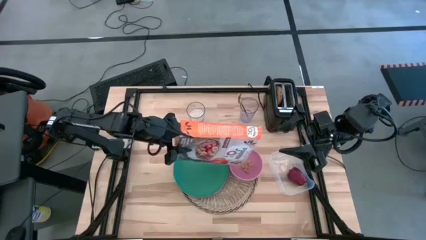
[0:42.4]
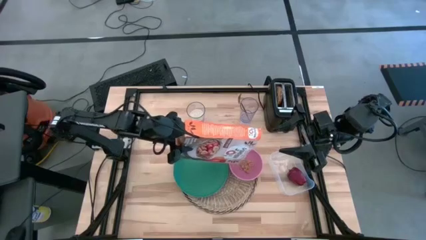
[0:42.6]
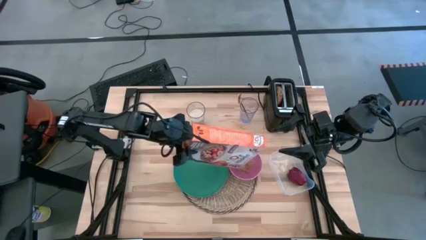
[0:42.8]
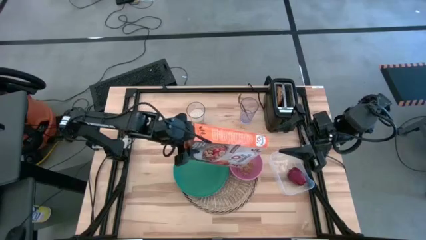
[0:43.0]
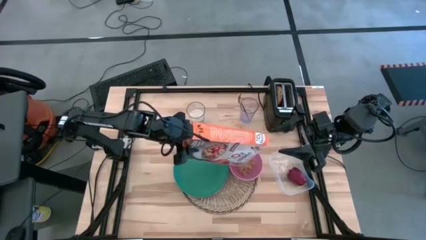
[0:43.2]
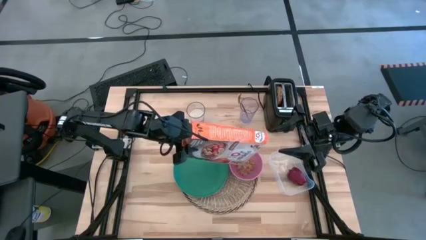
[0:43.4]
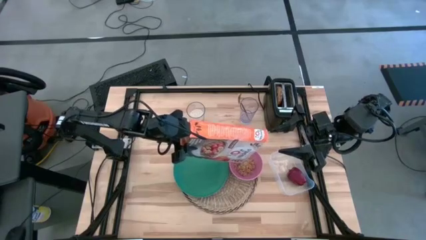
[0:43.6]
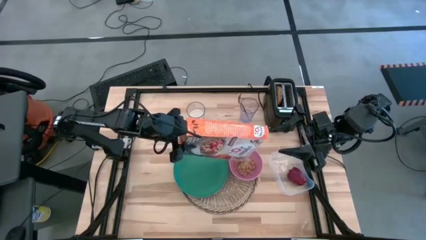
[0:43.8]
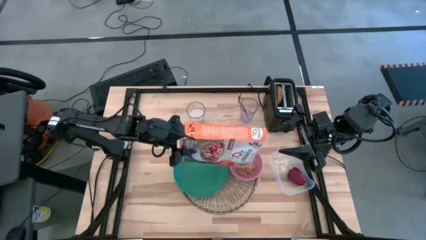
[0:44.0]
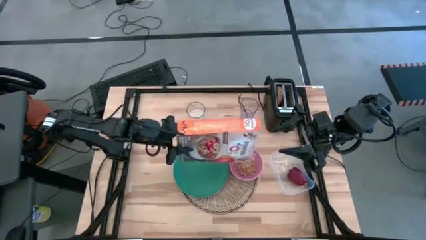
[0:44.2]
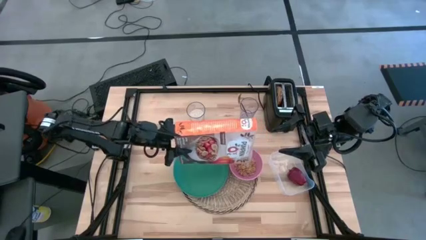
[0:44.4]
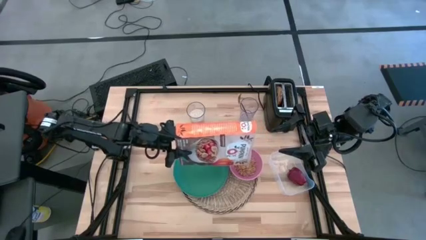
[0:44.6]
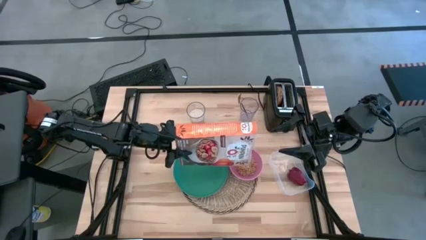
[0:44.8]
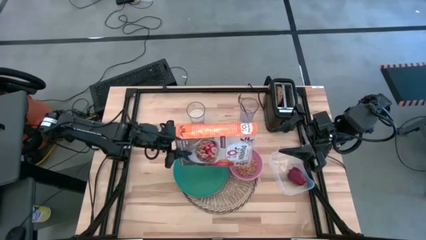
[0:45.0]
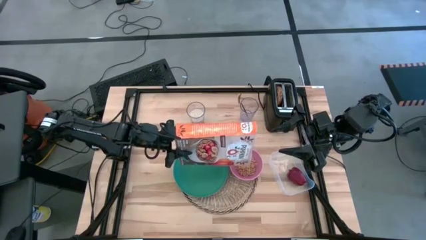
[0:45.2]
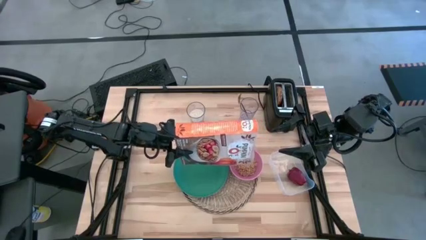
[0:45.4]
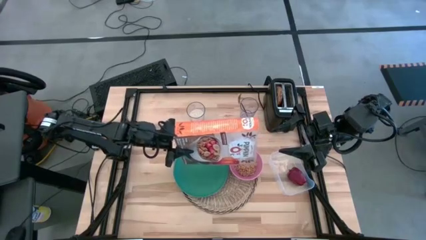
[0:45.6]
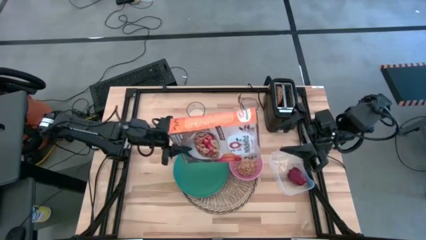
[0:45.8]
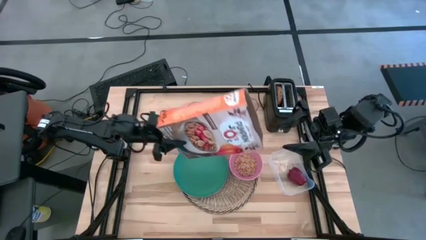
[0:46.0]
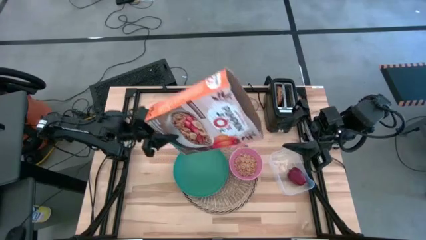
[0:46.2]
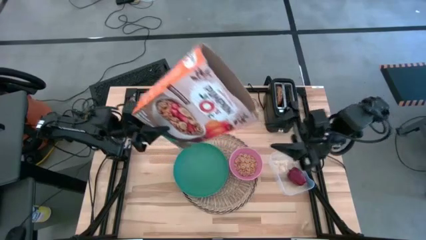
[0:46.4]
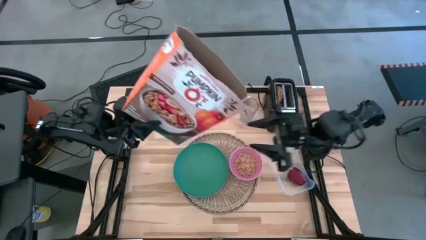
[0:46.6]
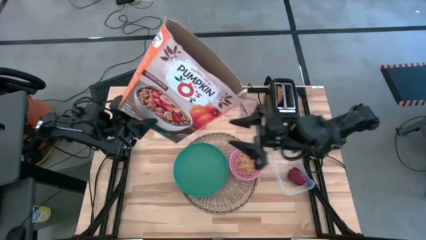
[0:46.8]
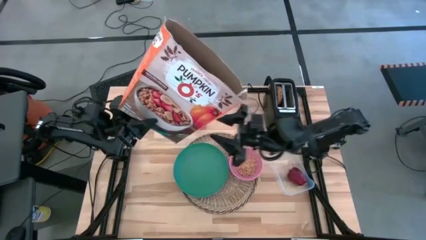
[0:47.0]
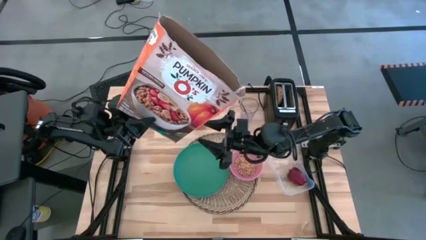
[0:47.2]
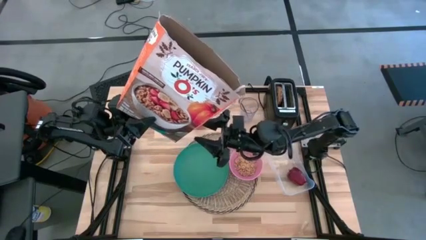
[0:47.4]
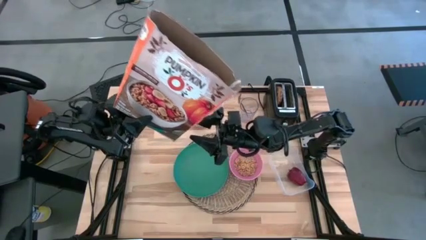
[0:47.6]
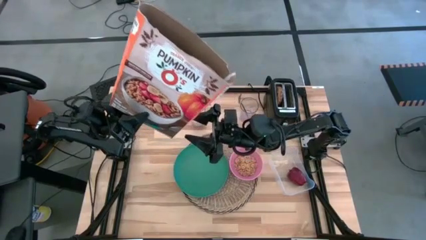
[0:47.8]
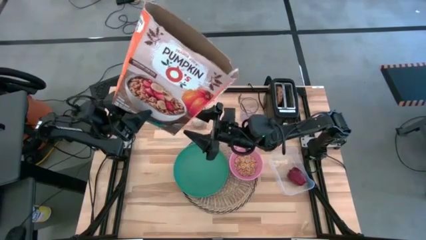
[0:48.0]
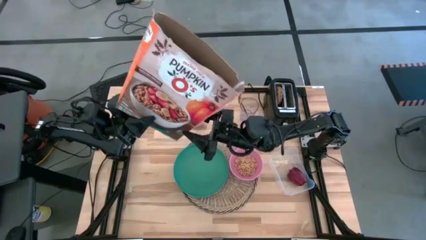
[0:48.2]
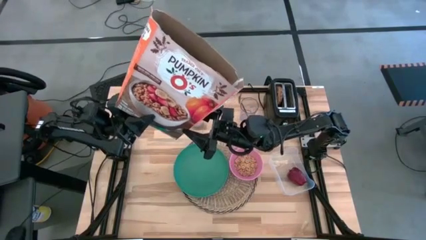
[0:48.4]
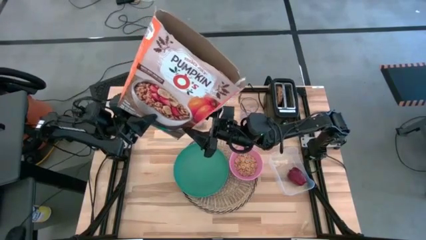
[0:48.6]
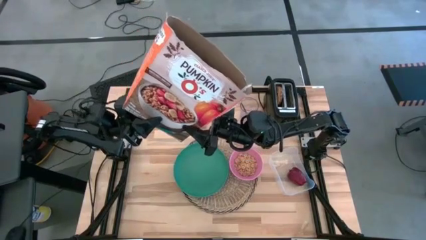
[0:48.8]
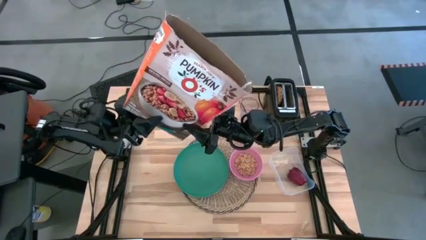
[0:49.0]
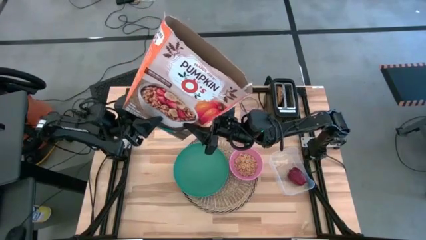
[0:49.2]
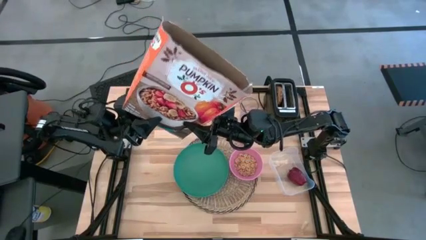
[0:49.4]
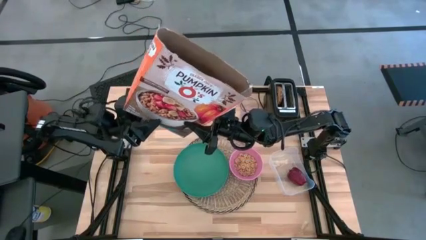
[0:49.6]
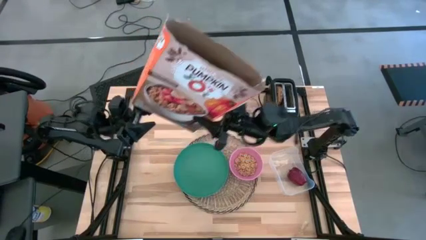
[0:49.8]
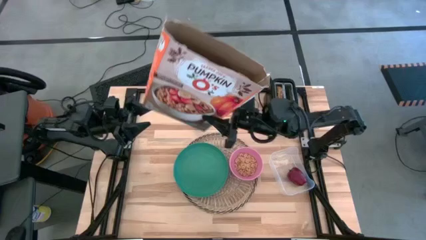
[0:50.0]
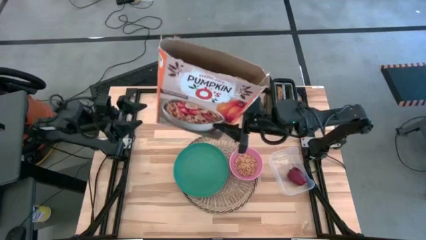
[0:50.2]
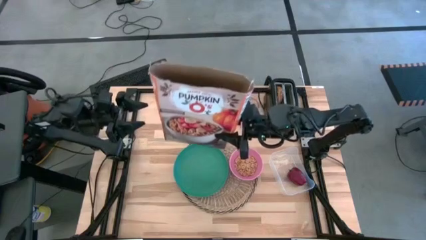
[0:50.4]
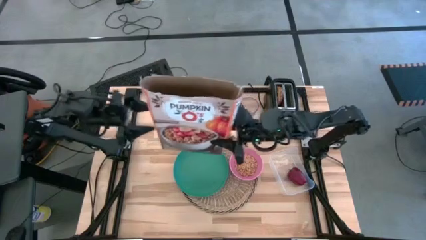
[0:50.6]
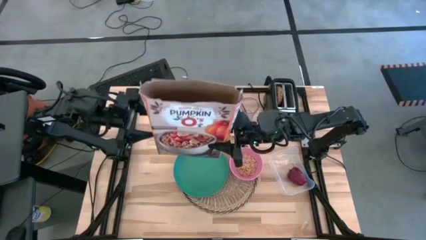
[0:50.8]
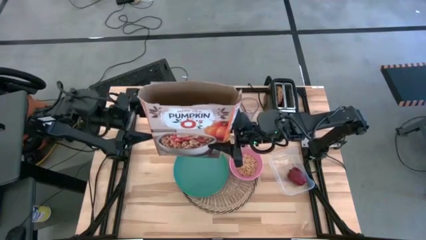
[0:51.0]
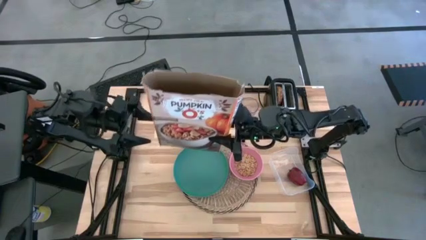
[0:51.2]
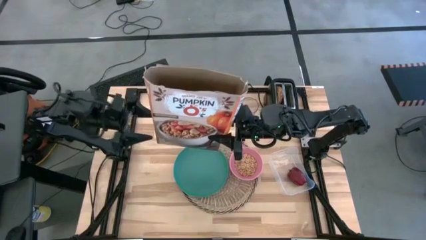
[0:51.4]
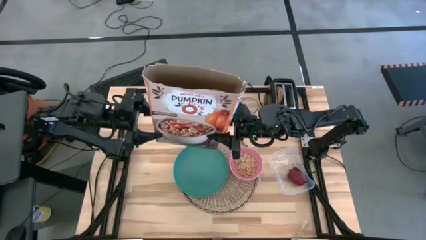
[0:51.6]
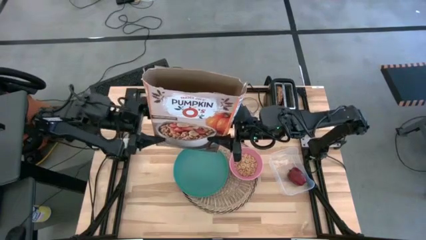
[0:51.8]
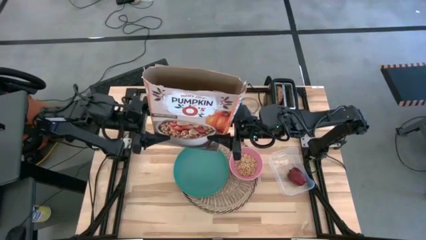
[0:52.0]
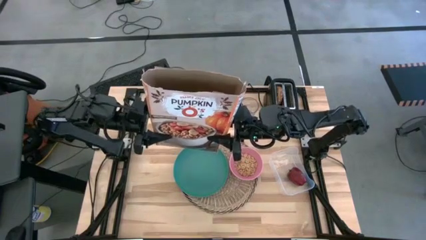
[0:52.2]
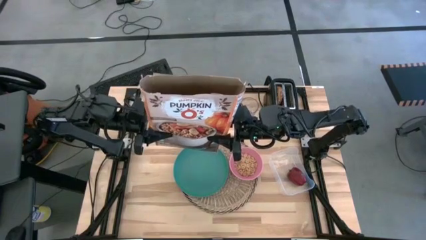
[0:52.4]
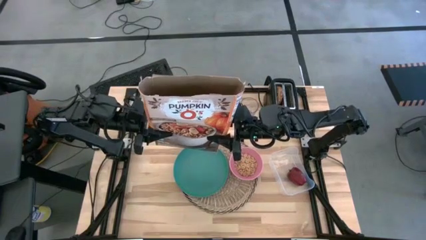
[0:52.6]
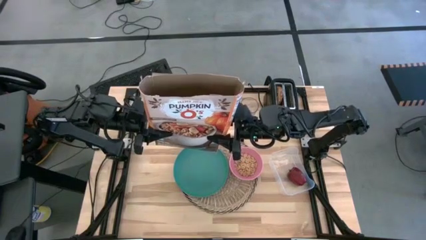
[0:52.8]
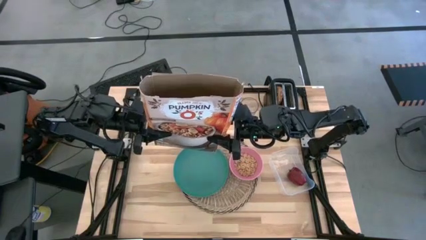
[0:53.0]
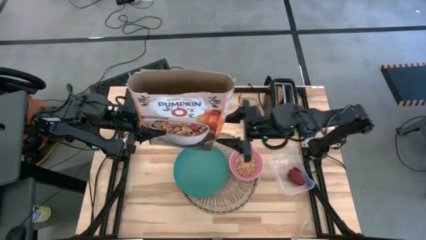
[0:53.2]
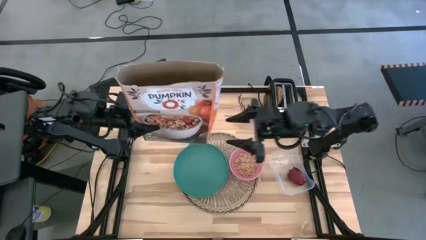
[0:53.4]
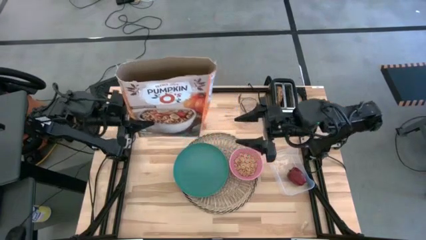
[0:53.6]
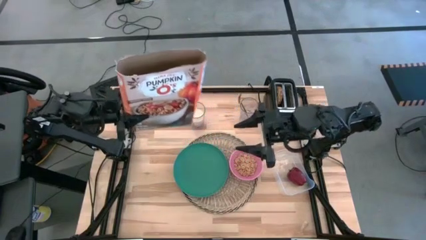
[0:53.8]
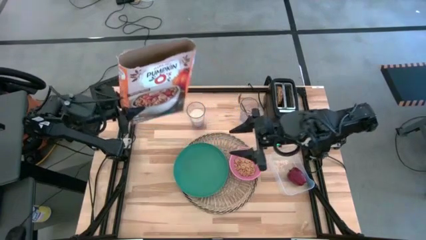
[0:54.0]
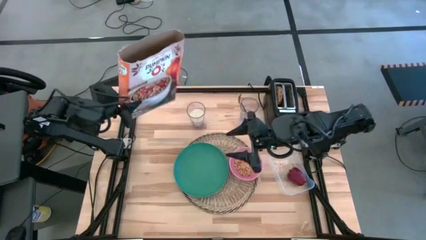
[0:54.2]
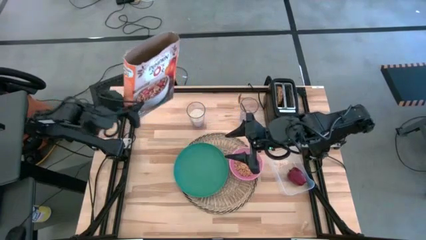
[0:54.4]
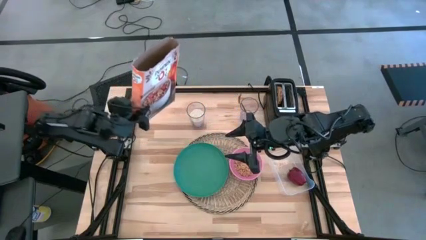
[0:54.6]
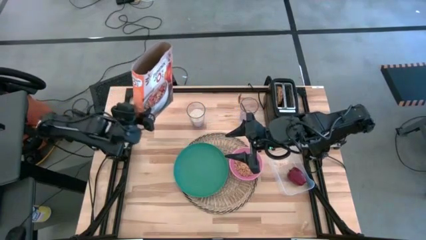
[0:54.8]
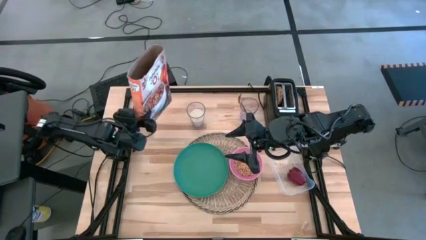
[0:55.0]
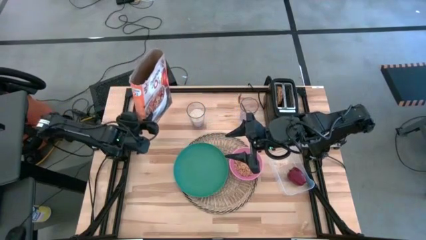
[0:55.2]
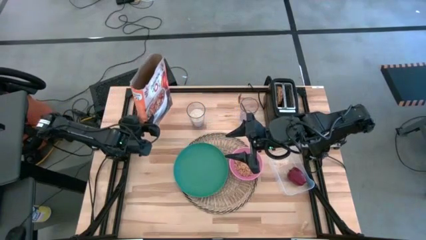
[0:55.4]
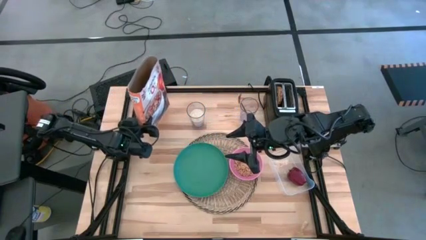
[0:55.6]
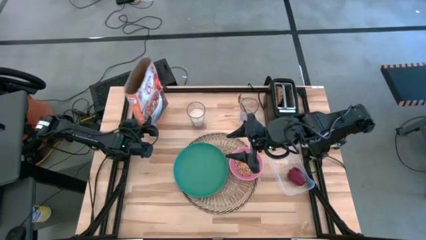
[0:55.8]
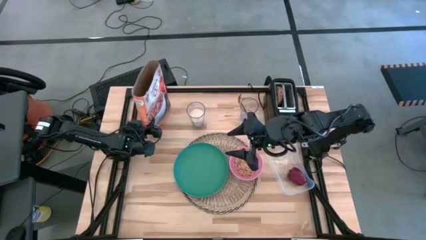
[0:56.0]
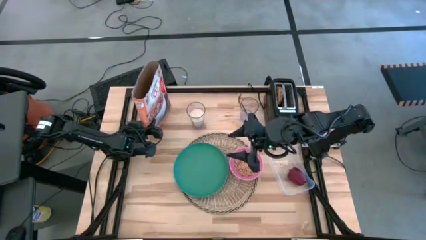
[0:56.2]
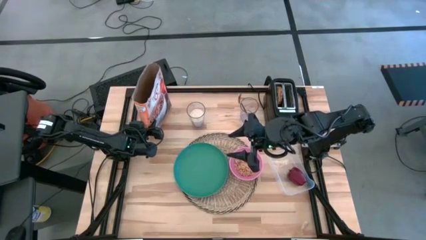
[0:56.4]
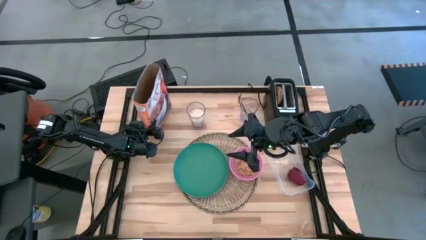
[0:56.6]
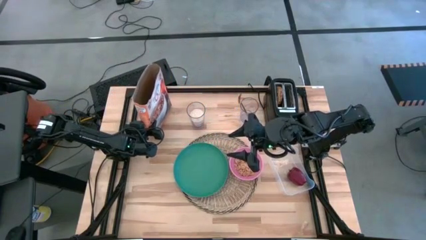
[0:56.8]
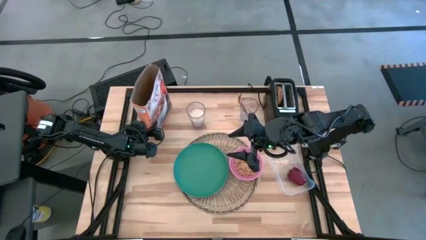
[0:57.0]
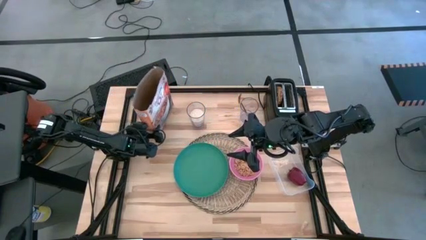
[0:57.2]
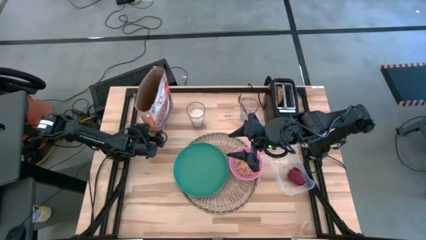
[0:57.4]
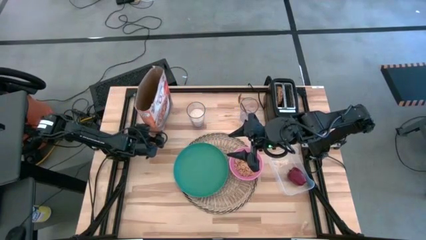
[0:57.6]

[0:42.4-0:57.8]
Task: Arrange a breakfast setting
Pour the cereals from the box into the pink bowl

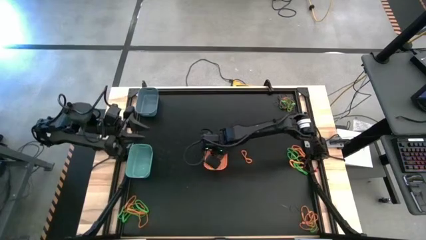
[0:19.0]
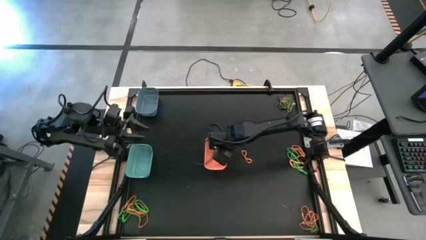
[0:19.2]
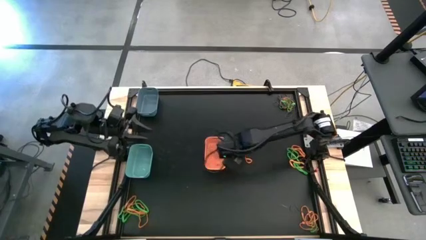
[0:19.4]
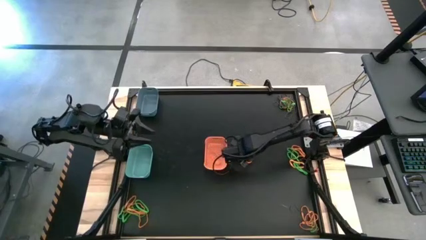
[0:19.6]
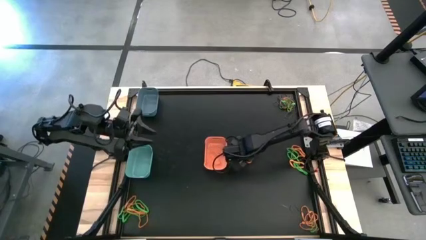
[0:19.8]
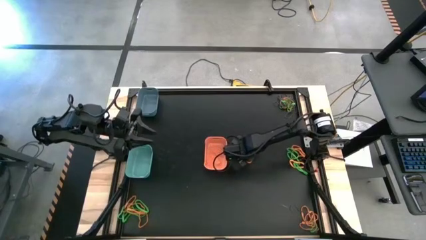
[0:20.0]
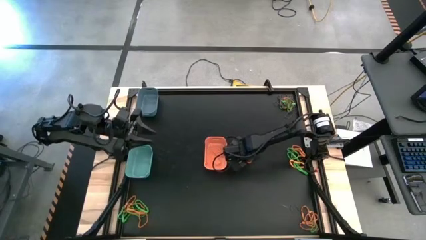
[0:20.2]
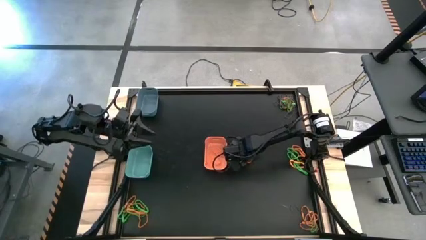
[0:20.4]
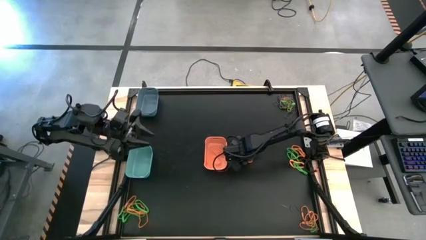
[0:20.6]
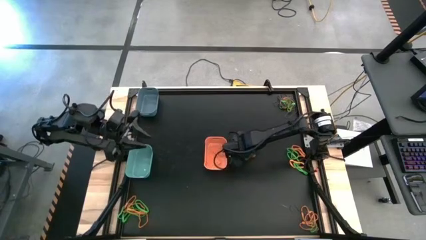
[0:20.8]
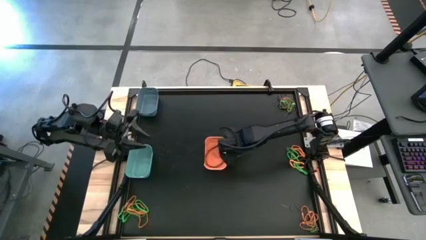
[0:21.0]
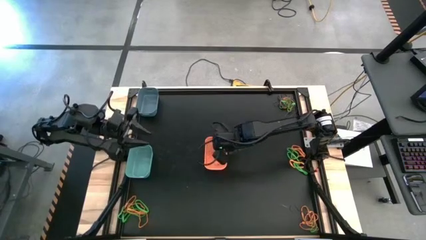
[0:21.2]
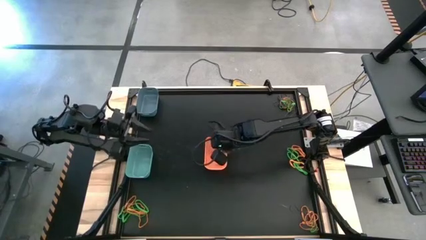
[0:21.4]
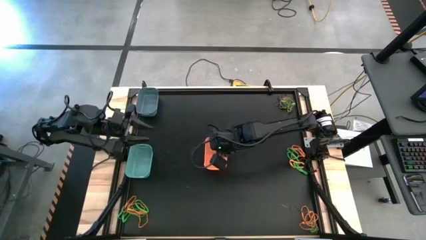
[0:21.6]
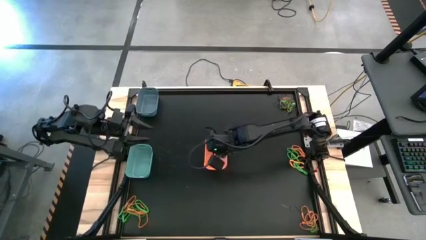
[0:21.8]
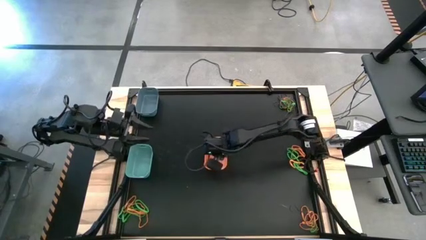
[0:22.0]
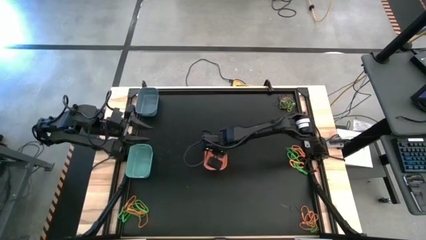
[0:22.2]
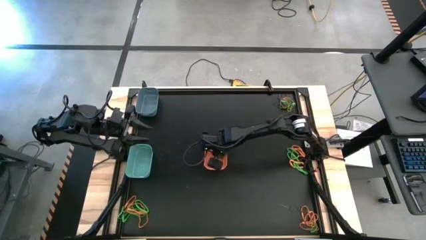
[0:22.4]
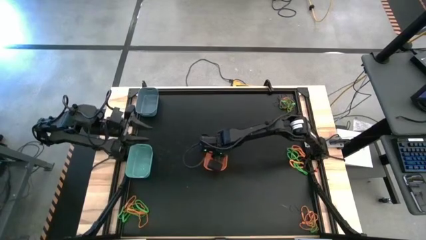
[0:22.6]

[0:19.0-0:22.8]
Task: Sort rubber bands into baskets
Put the orange rubber band into the orange bin
